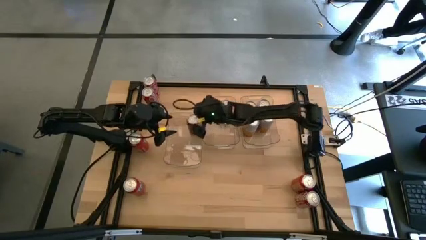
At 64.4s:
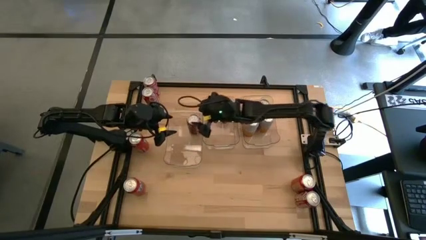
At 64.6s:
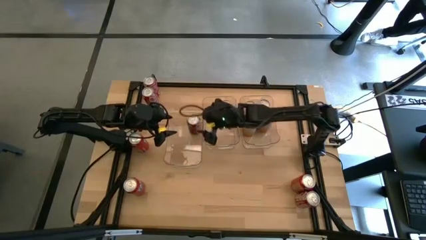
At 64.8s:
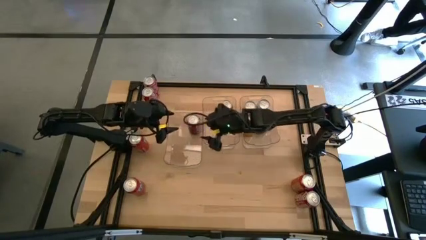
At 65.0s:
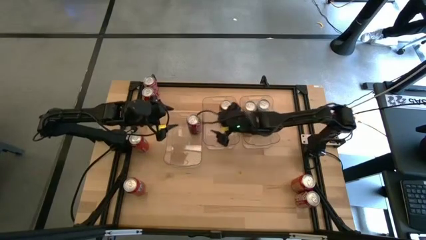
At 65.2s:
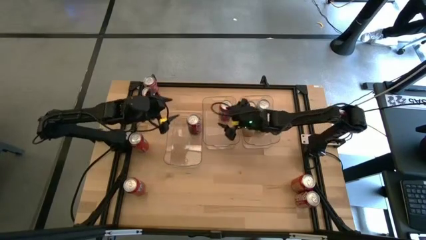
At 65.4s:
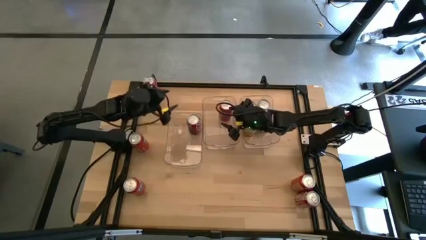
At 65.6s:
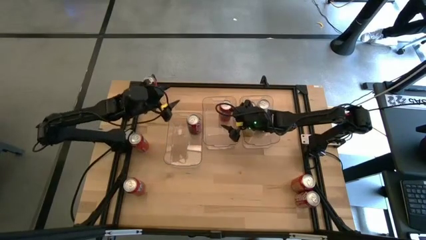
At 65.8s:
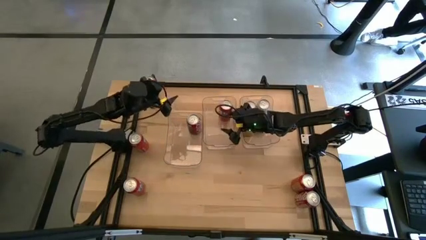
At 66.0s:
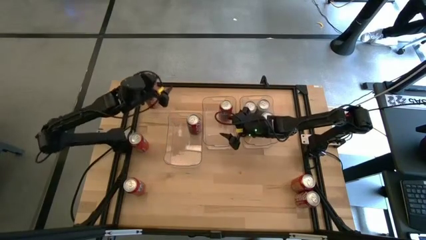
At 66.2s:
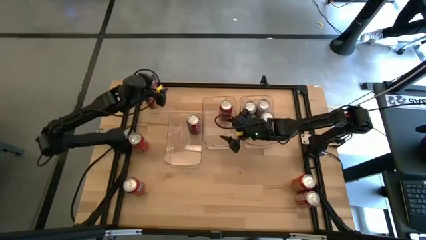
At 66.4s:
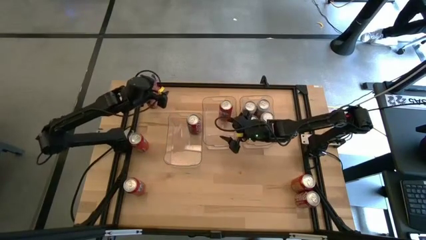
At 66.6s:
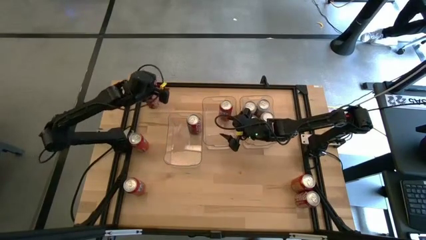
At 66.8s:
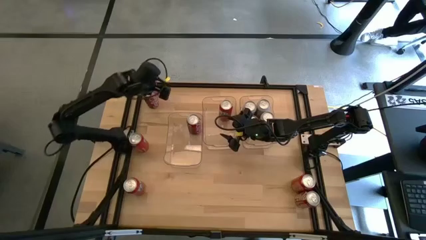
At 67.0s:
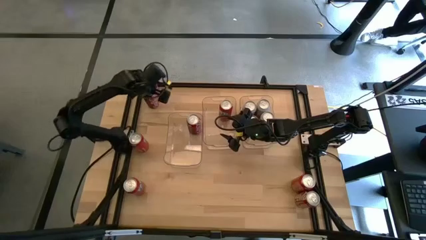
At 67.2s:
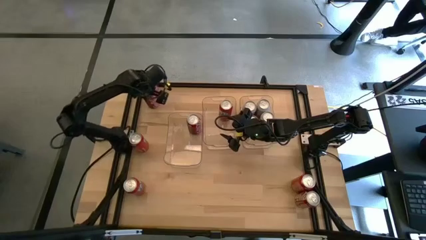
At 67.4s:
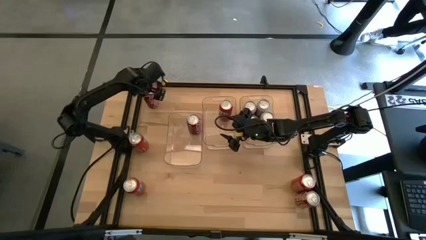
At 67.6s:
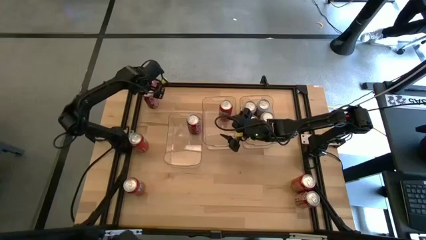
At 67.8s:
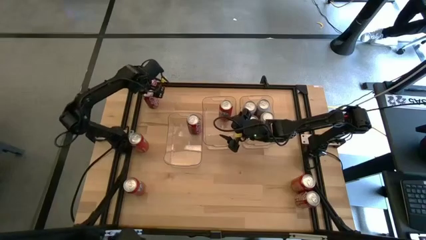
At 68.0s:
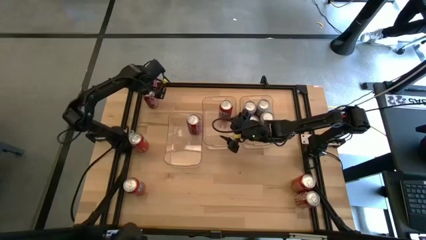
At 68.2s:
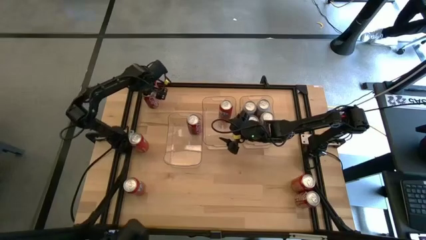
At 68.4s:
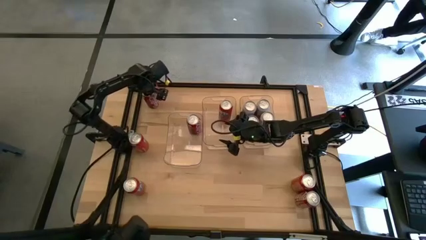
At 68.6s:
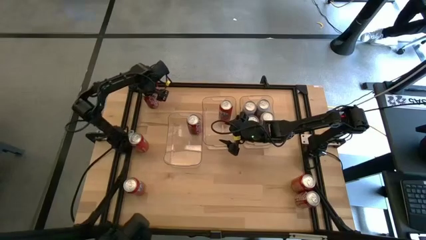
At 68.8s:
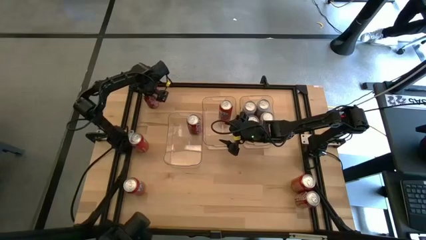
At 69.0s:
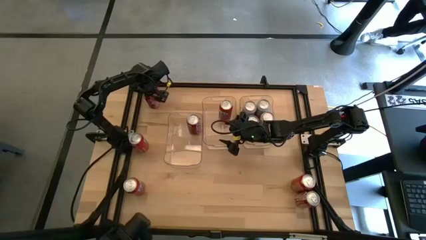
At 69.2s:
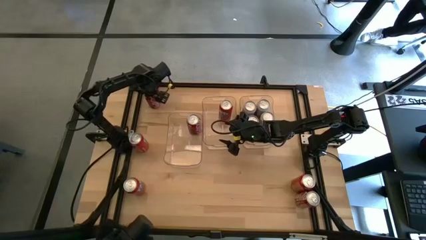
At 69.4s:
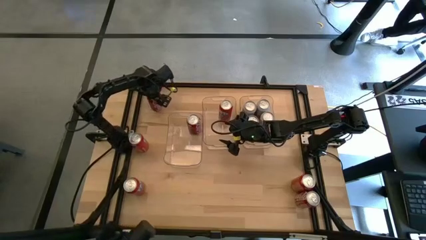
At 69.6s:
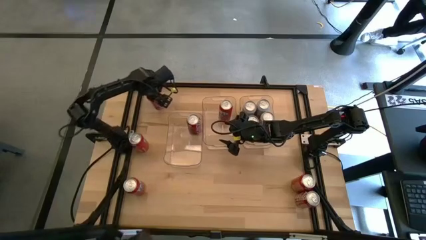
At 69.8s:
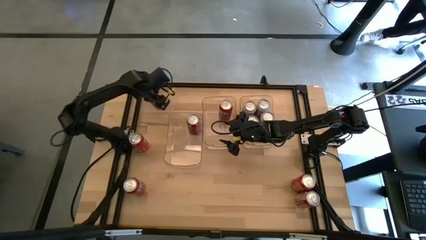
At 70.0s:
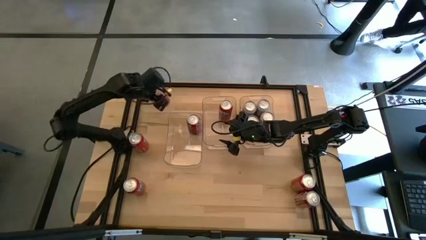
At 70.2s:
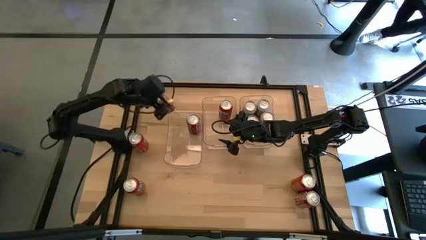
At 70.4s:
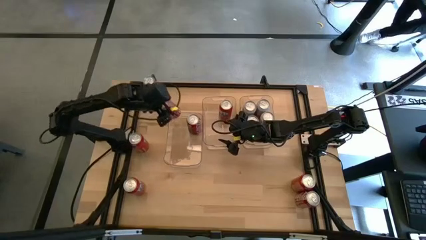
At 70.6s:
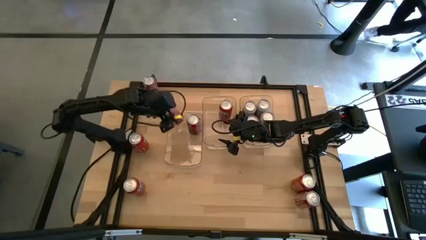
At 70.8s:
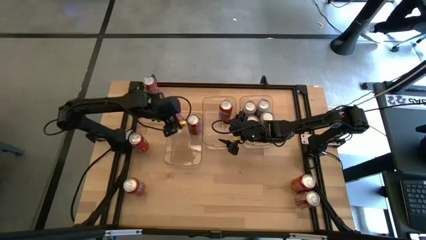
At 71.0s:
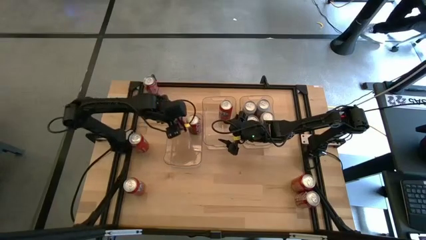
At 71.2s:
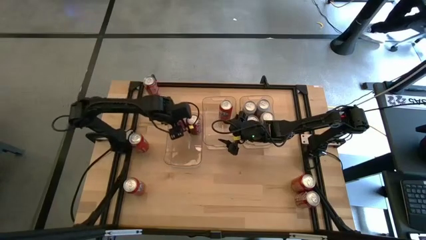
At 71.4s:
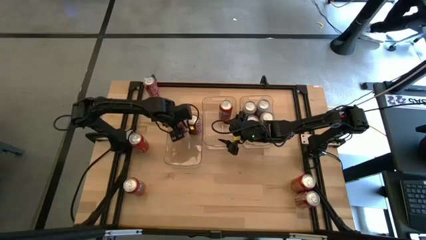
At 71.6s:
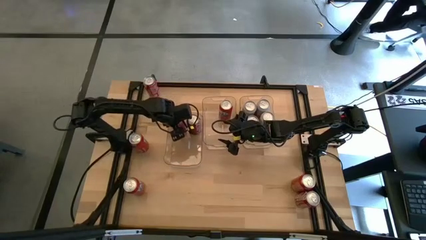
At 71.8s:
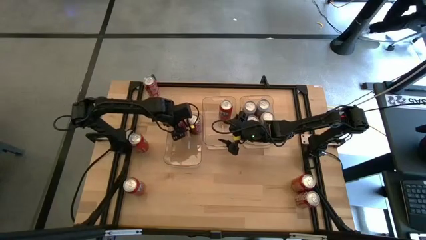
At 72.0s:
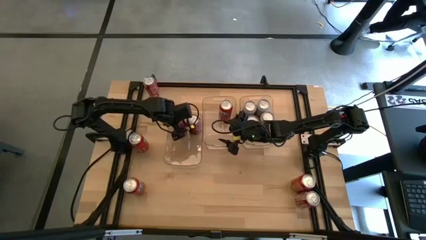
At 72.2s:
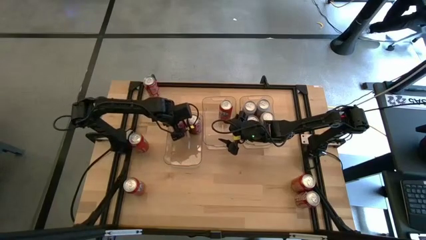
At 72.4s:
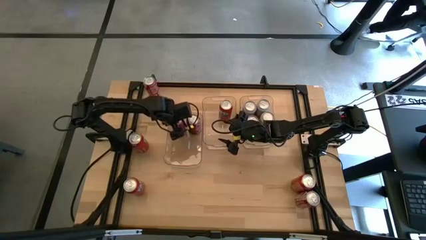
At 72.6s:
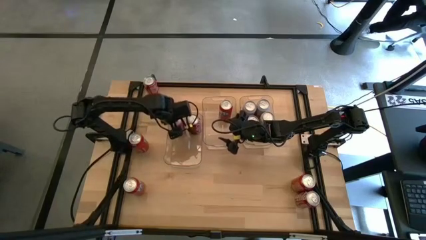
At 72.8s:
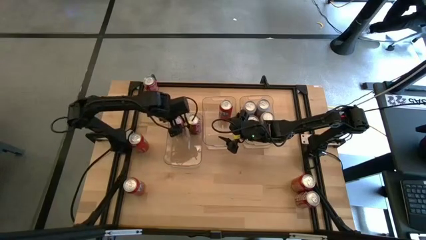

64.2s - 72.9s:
Task: Sort soda cans
Put the top left red soda can into the middle left transparent bin

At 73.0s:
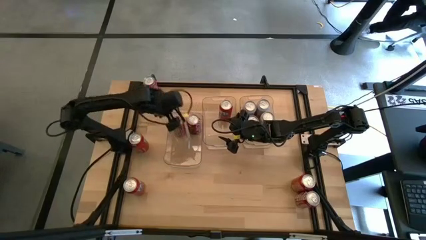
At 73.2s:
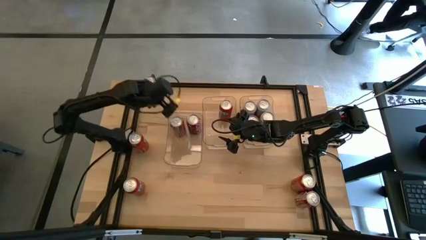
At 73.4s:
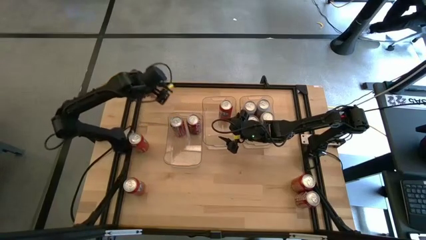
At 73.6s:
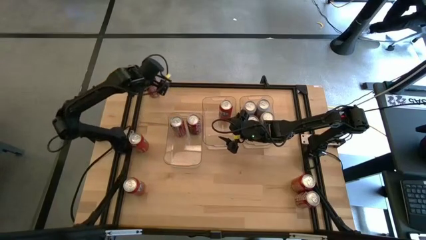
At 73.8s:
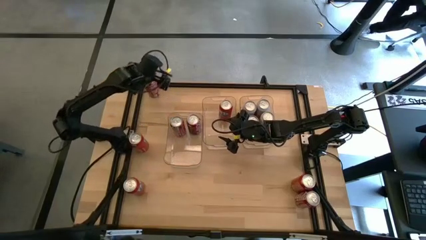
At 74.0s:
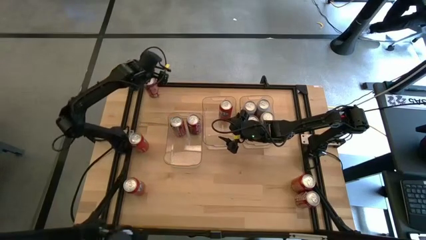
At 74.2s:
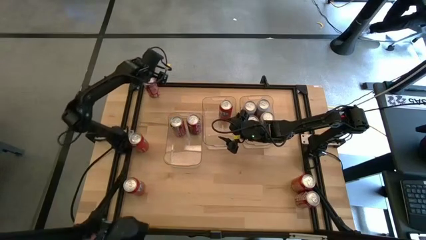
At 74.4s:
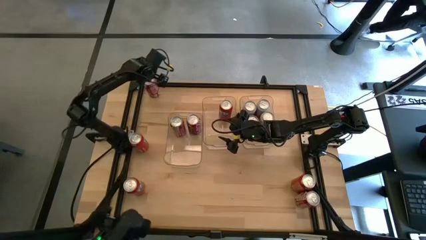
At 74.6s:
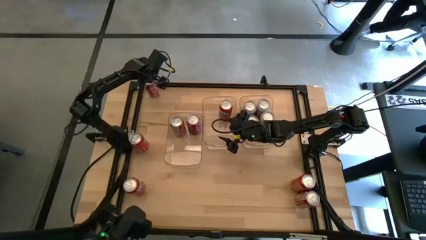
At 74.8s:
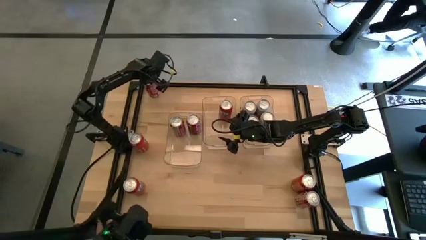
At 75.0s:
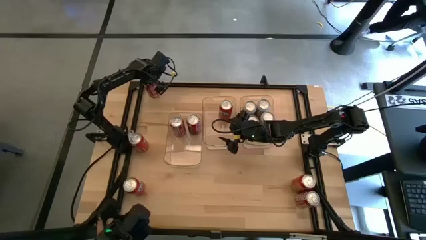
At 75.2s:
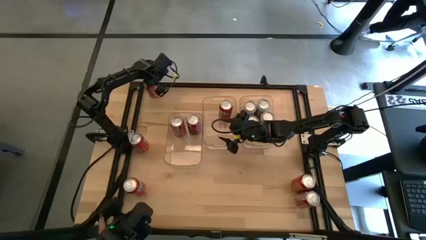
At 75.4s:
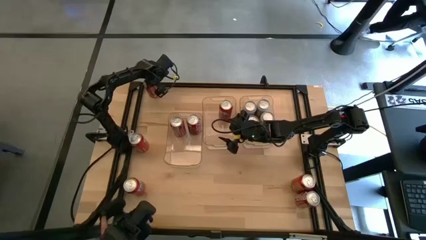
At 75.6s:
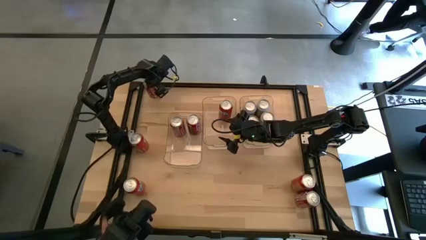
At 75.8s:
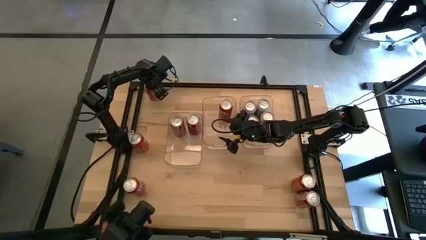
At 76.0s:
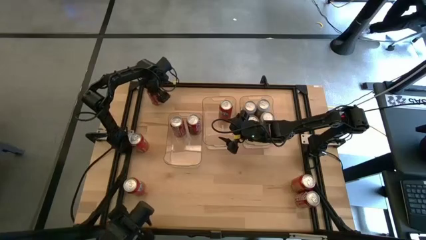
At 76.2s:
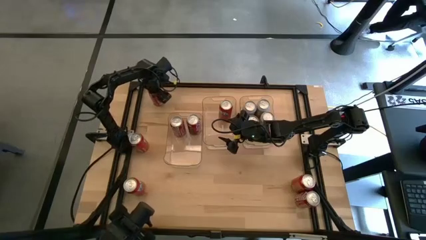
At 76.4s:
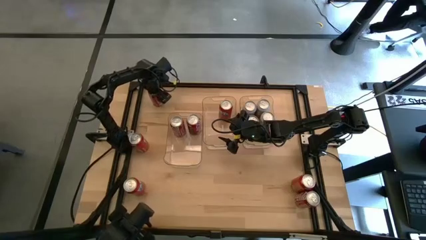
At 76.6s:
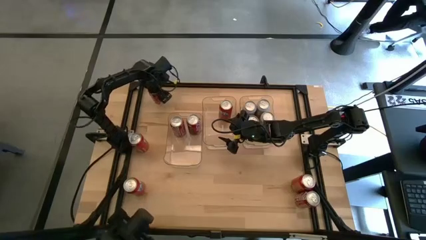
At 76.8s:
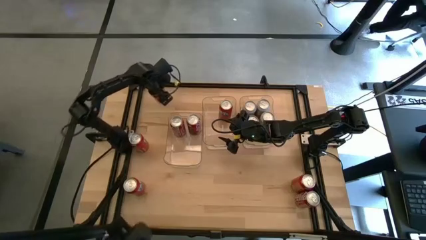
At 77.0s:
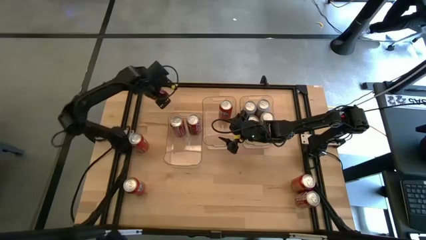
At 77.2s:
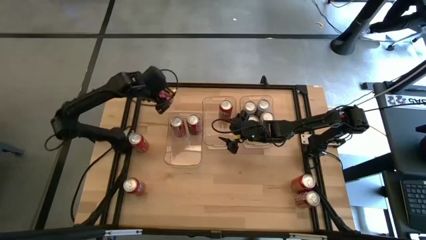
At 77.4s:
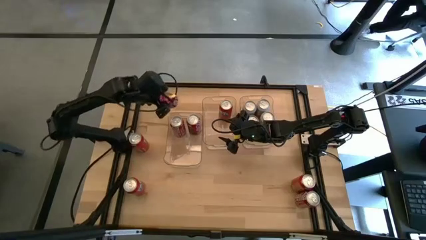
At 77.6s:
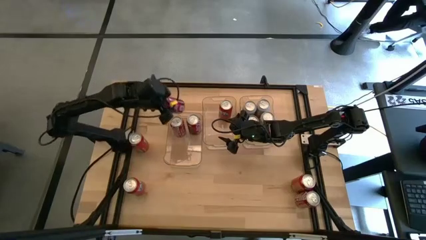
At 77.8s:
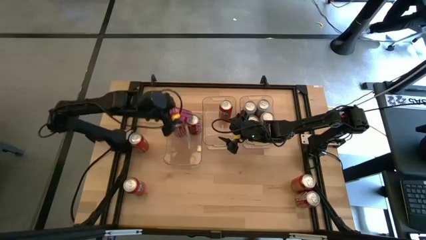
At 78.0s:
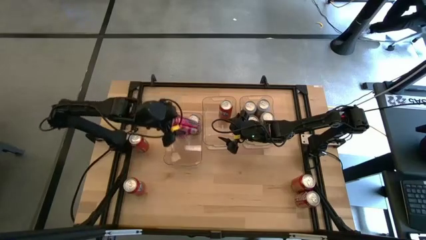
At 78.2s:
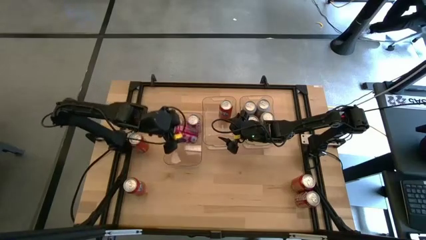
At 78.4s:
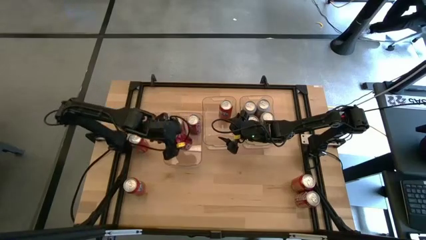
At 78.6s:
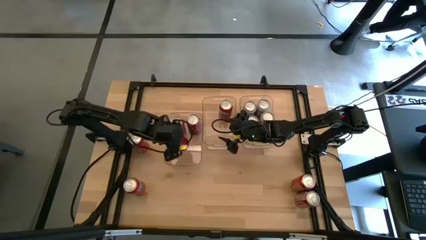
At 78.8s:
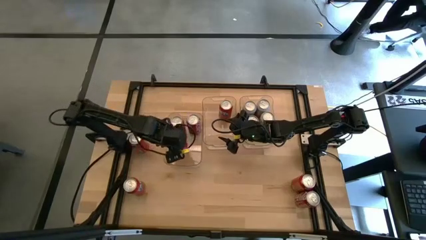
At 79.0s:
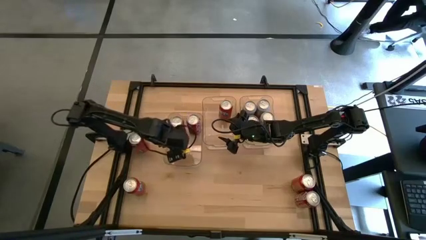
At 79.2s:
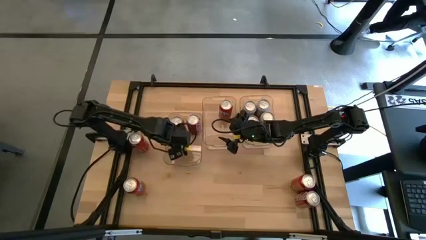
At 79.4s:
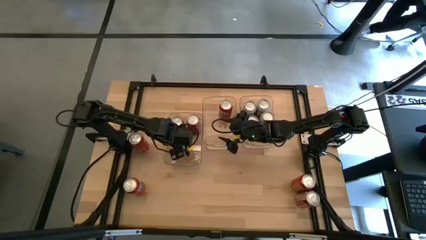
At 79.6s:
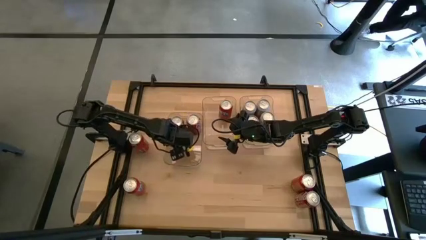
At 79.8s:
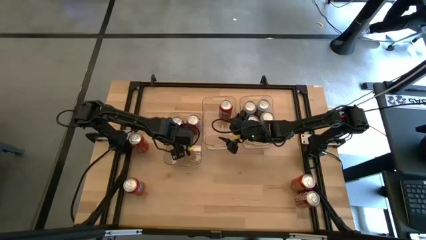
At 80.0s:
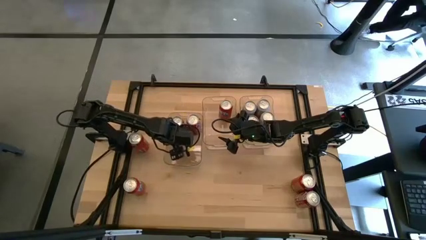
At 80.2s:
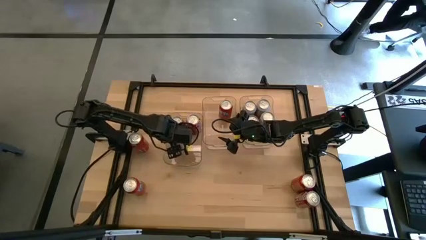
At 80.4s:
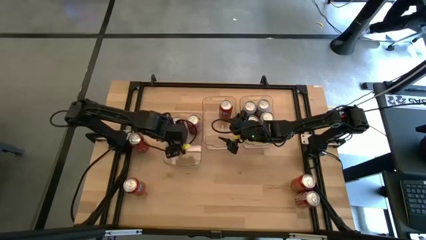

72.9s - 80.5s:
Put the top red soda can into the middle left transparent bin

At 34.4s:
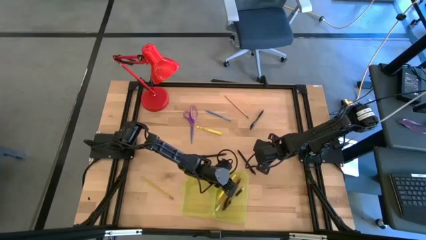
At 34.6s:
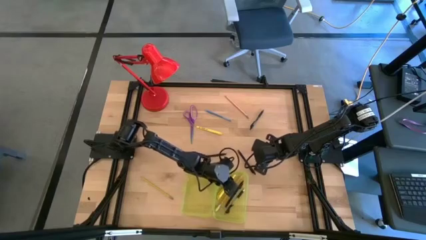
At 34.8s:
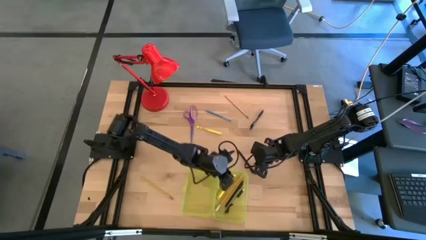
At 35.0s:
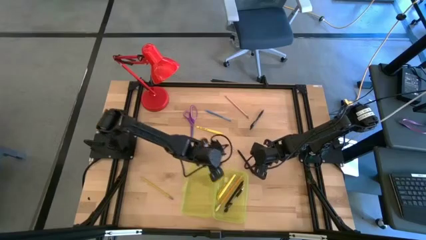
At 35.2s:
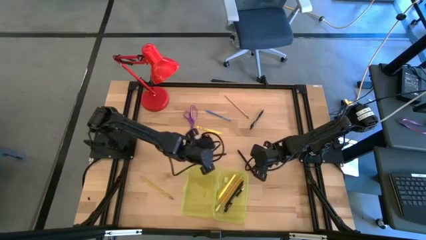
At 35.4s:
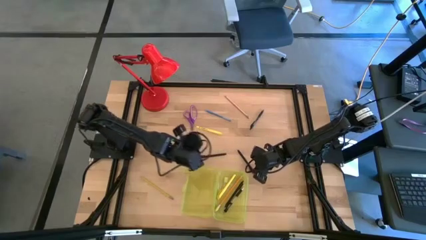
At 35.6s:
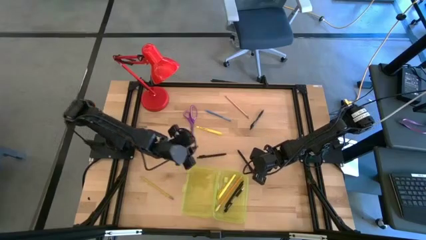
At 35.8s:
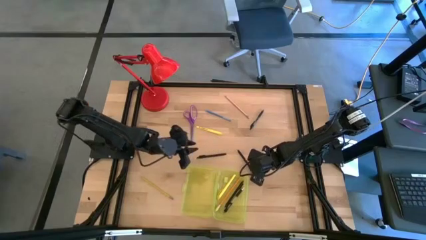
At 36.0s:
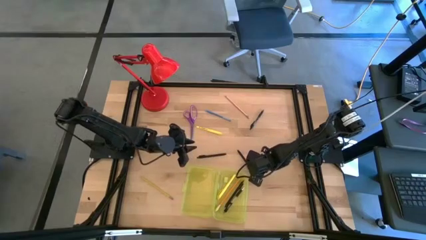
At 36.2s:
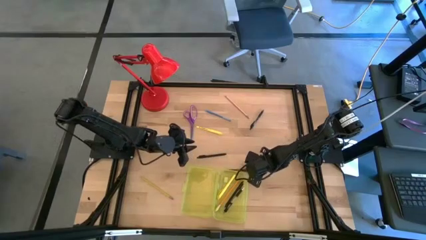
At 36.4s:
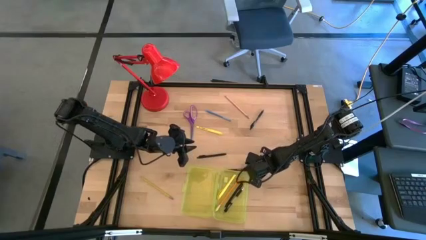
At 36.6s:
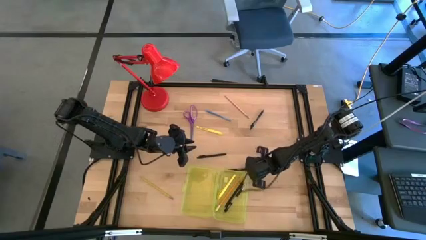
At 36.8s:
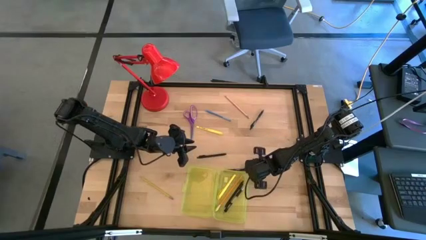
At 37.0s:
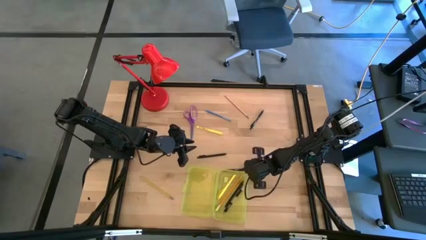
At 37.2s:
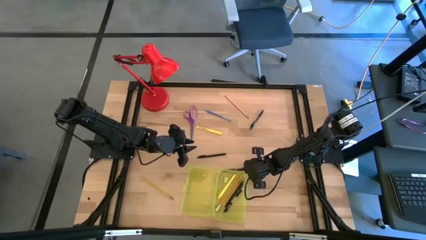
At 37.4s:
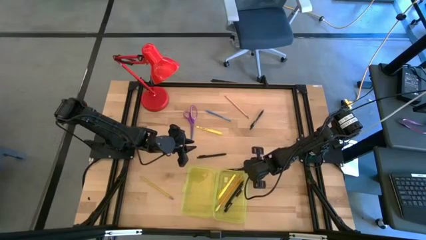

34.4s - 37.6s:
Task: Pick & place school supplies into a supply box
Put the black pen into the yellow supply box
